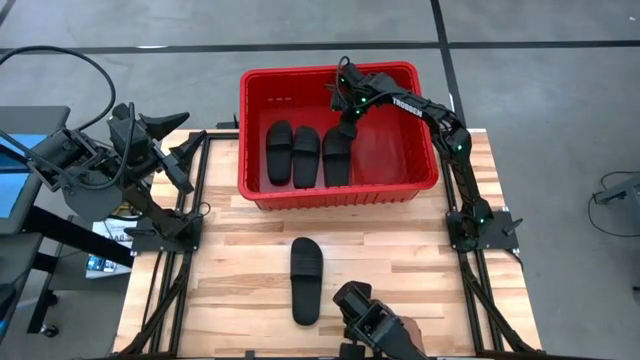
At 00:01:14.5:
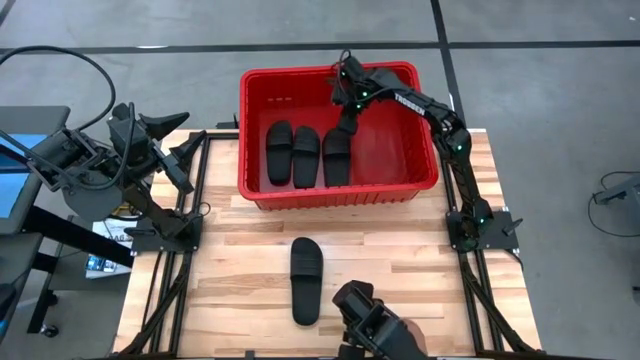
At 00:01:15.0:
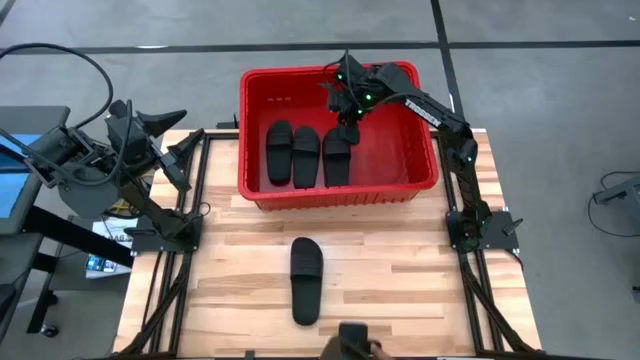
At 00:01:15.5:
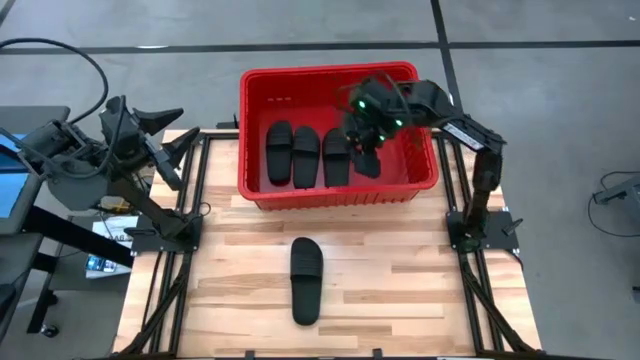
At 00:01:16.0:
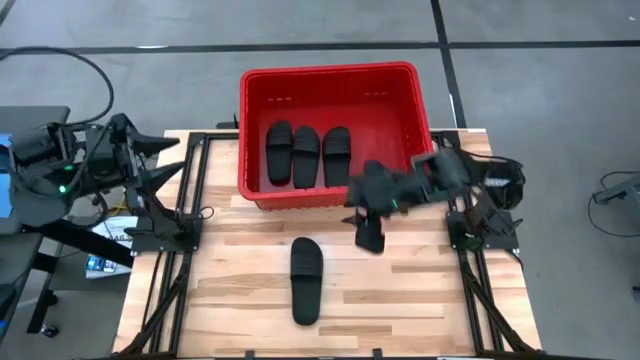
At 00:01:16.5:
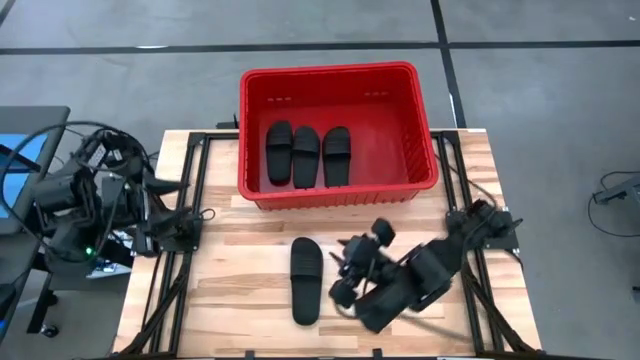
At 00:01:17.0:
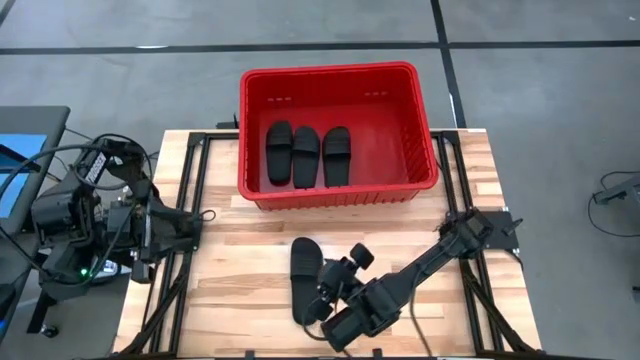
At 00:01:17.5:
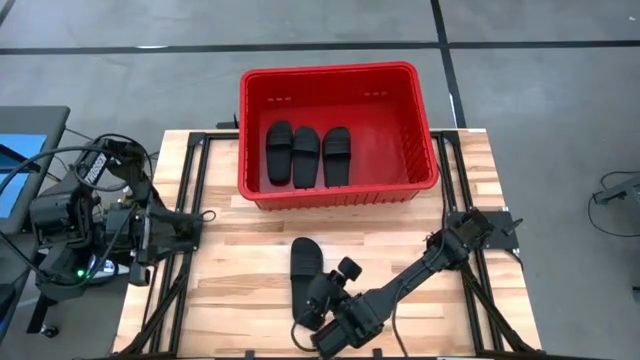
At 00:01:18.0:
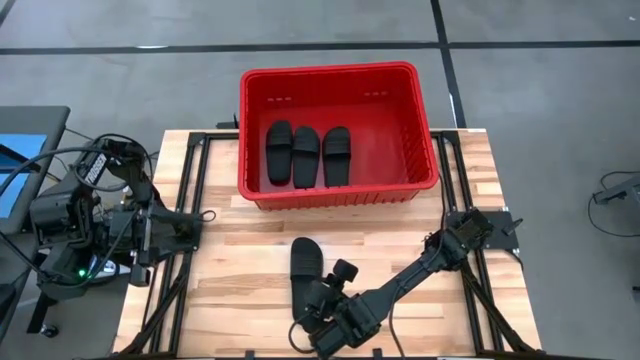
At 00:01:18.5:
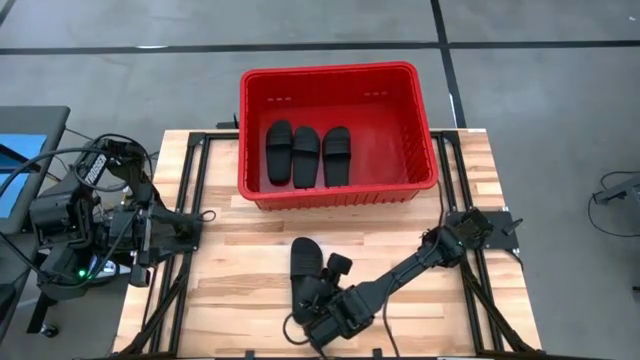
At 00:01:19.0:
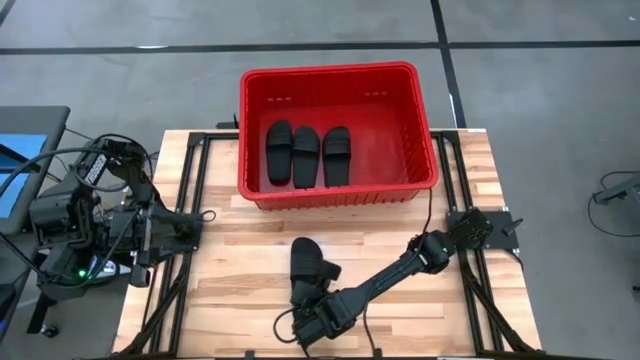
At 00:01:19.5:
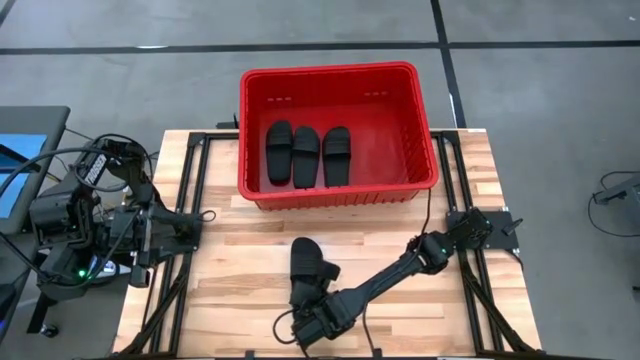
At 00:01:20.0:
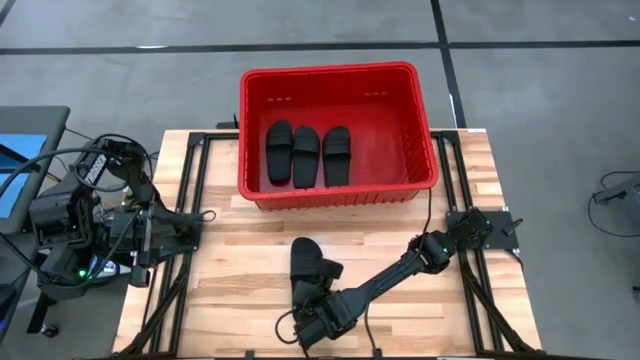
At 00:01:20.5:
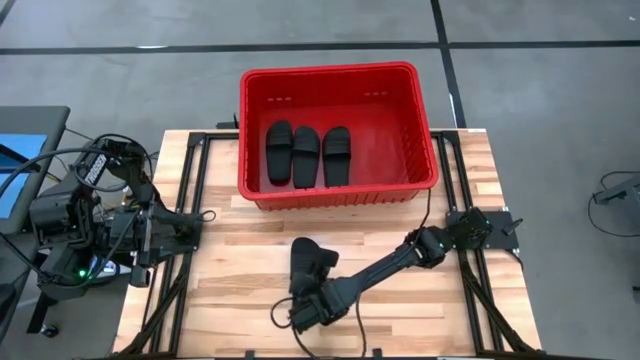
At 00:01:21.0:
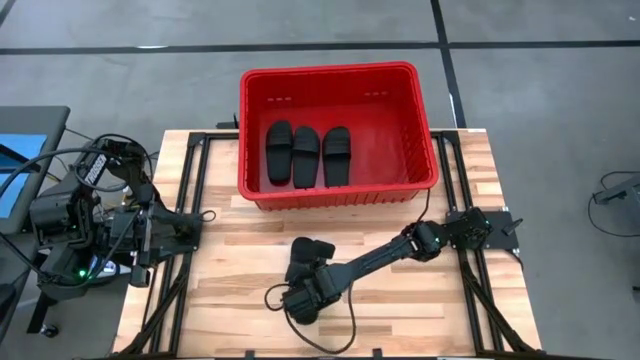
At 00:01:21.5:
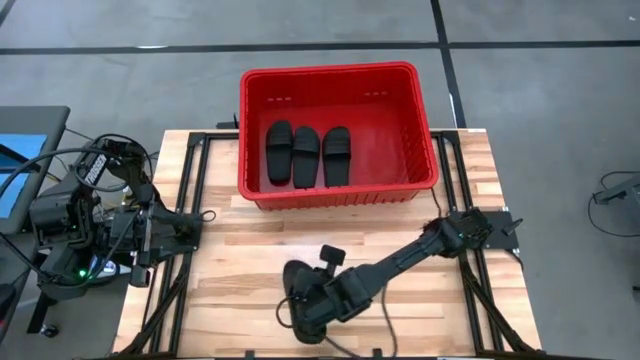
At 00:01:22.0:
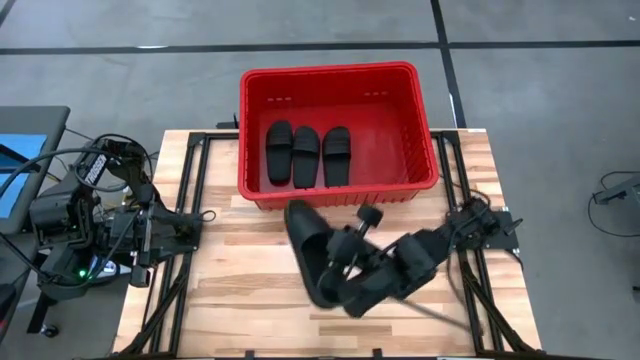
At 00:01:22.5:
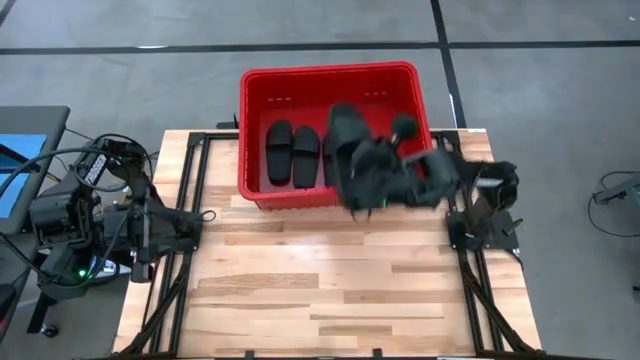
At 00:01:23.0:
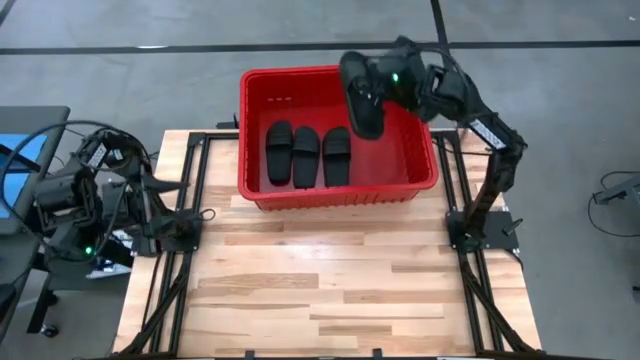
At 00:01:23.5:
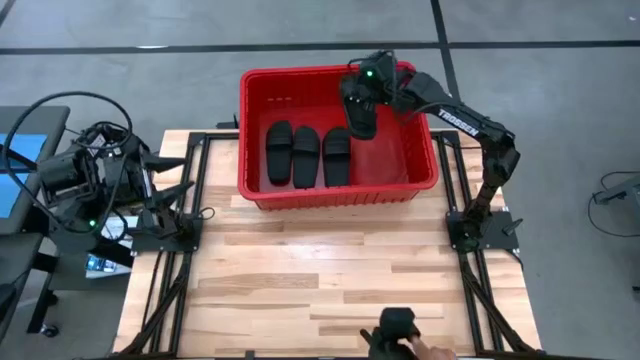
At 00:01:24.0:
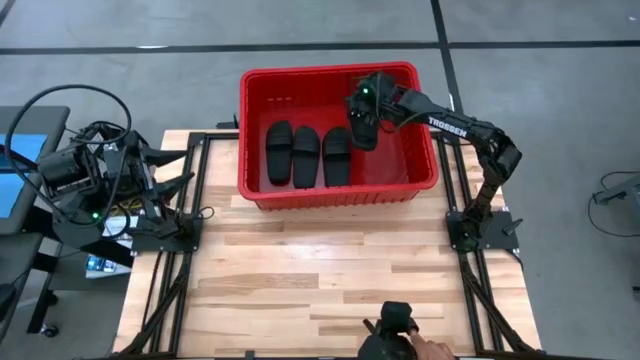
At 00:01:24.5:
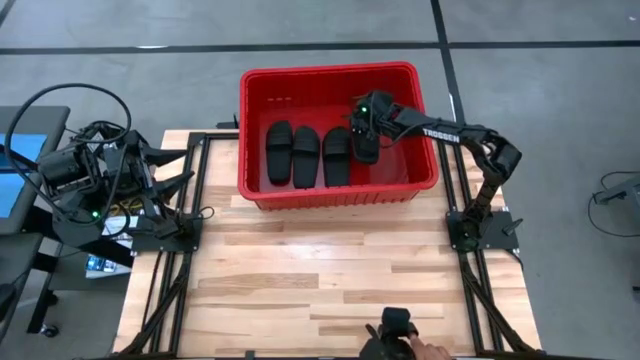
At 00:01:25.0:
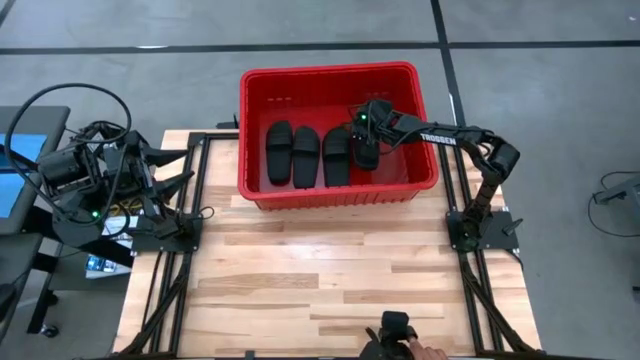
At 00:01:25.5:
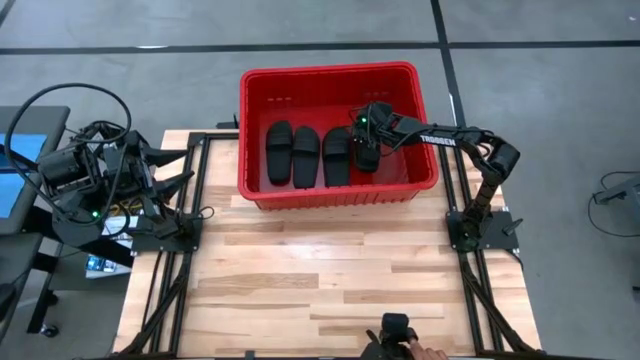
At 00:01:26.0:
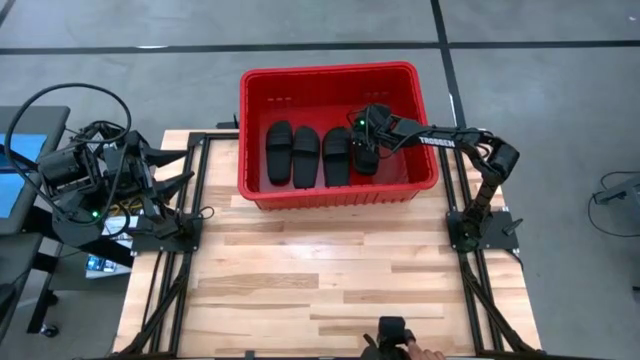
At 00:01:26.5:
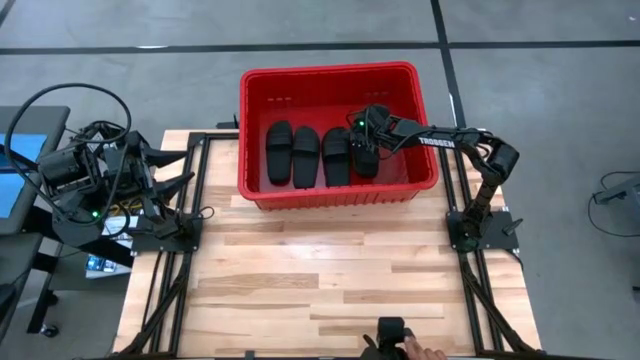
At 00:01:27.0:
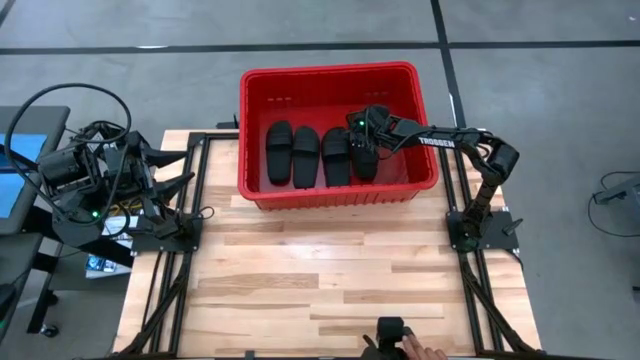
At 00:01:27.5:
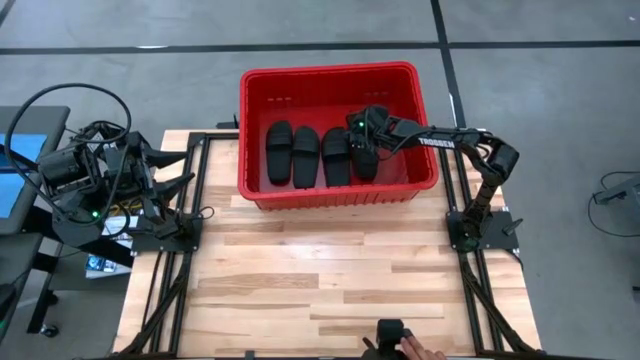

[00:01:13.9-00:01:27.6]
Task: Pick and place slides into bin
Put the black slide into the red organizer bin
